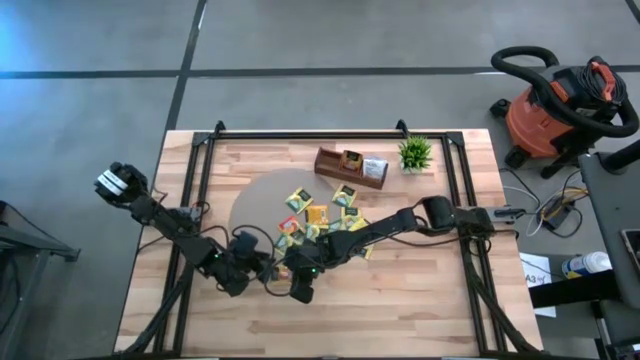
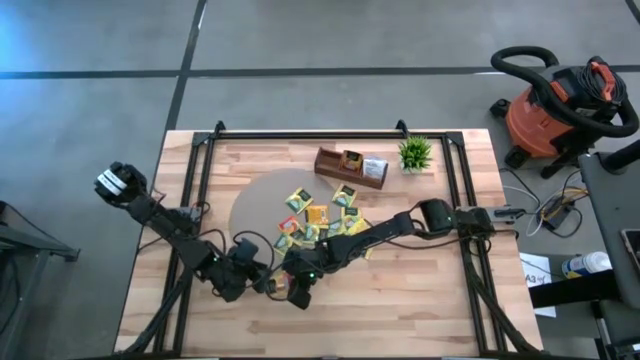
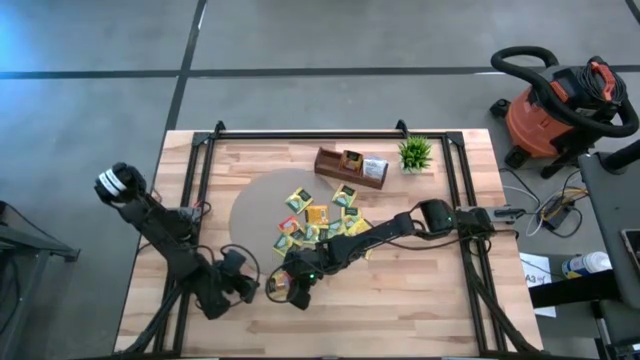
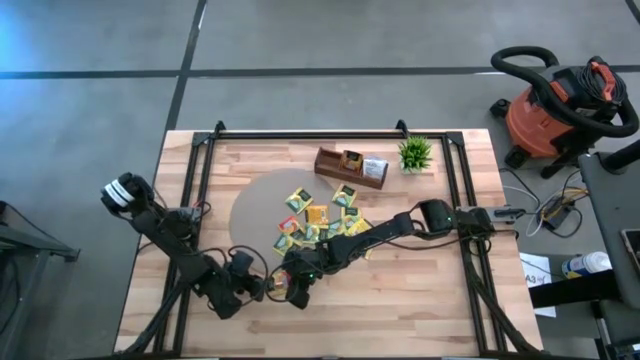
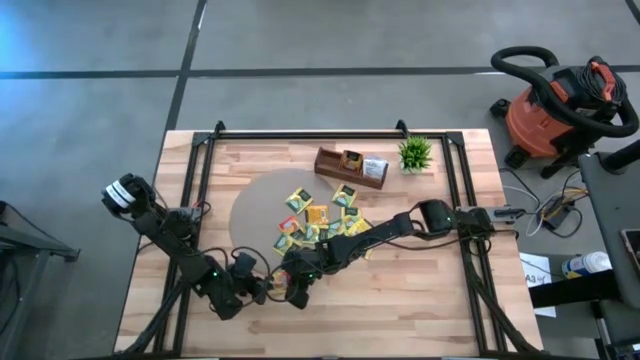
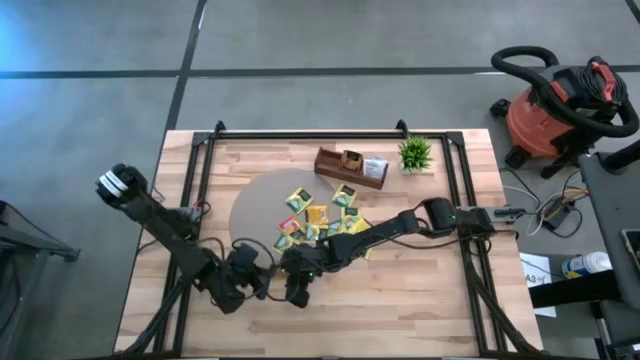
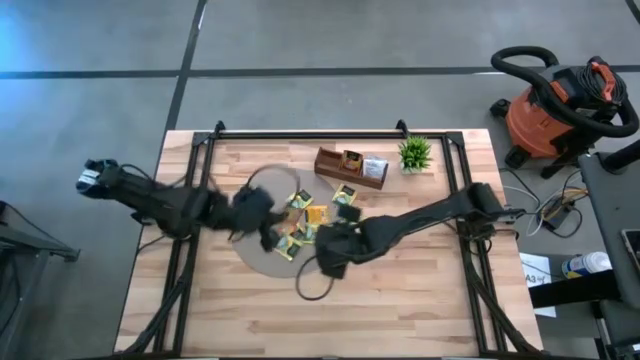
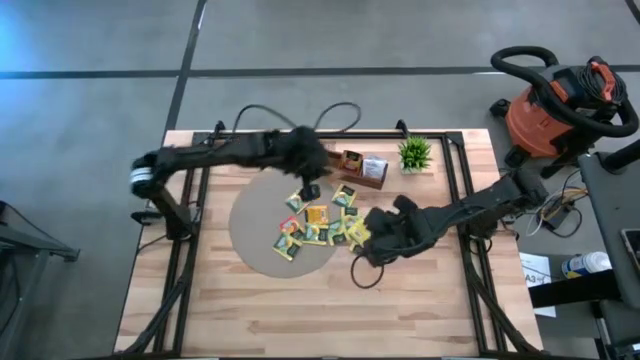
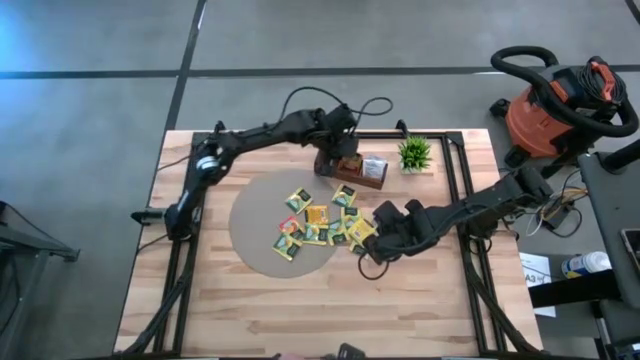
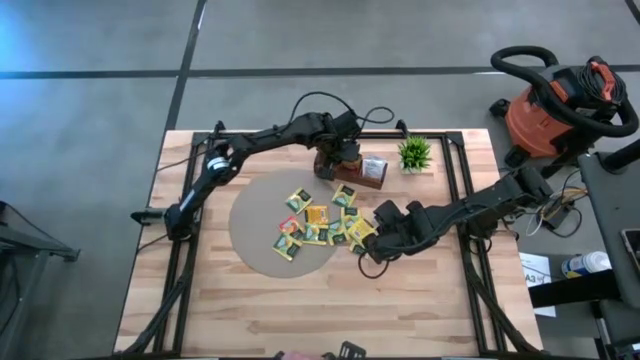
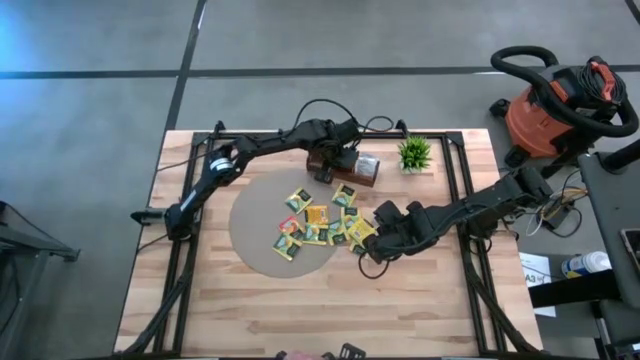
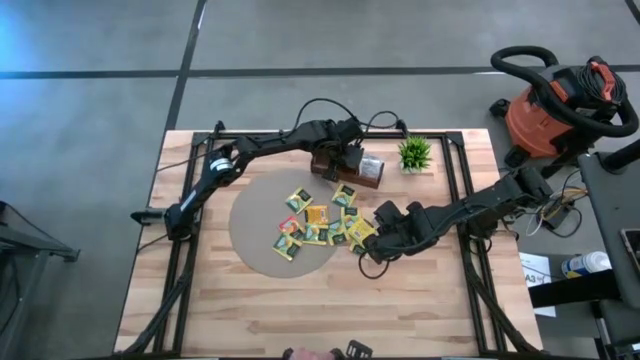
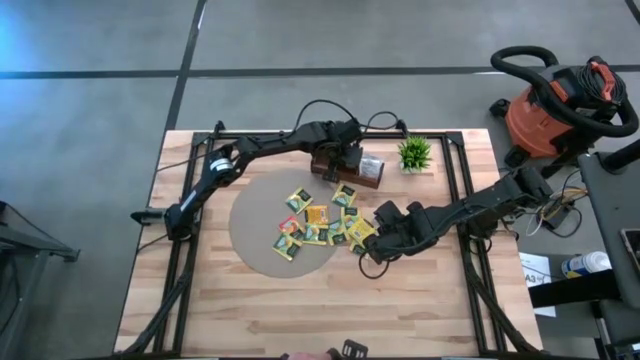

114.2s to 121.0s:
Task: Pick & Place Tea
Put the red tea sachet into the middle compartment of the wooden organizer

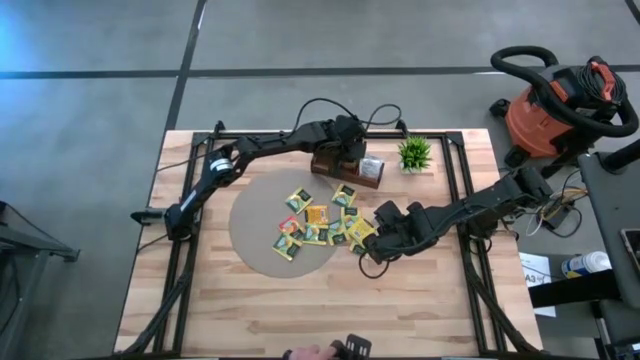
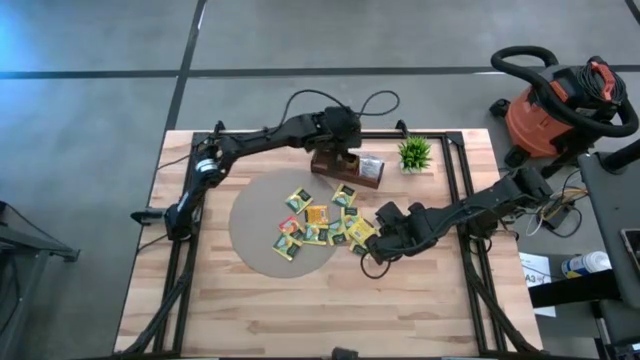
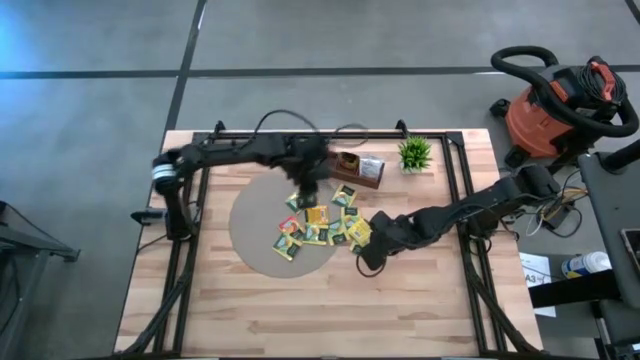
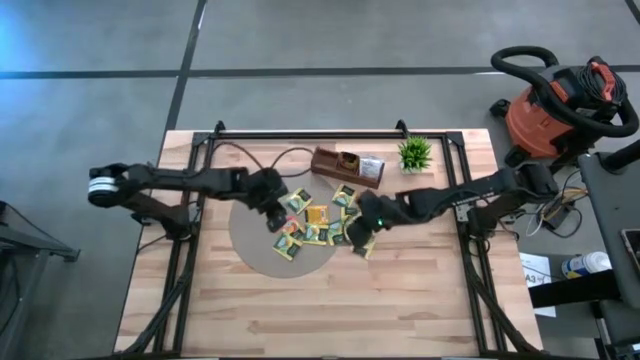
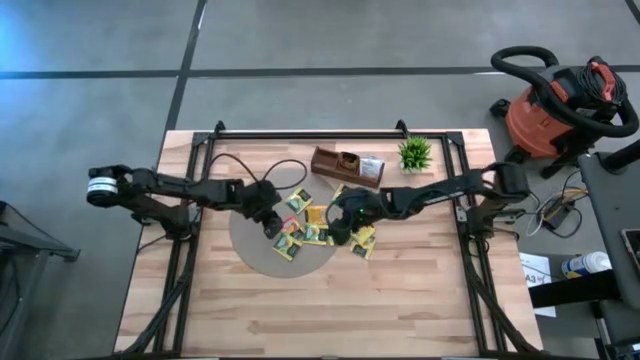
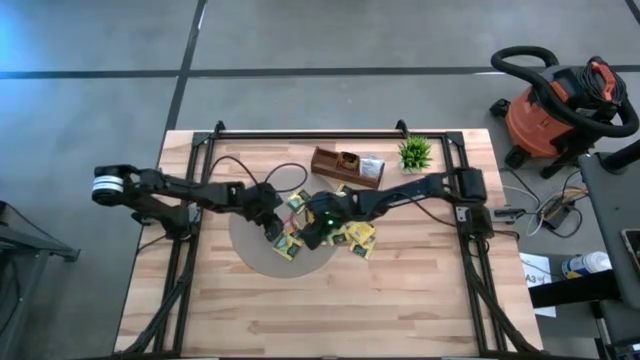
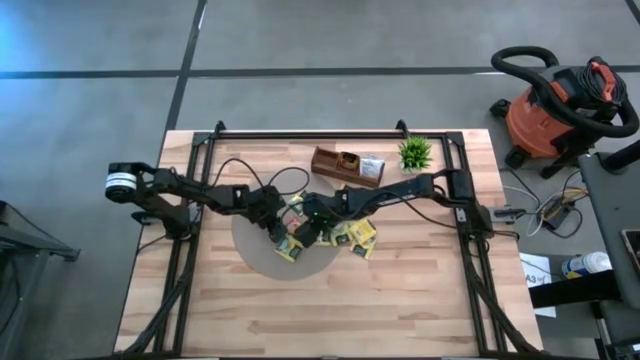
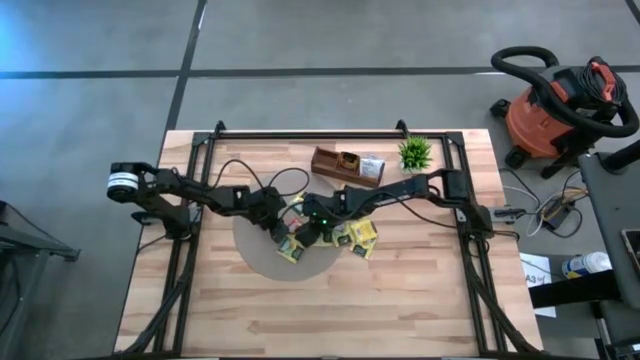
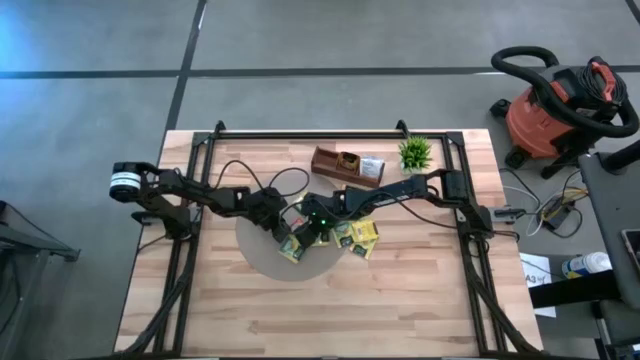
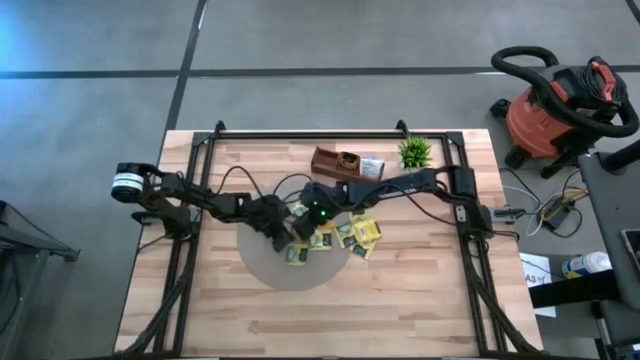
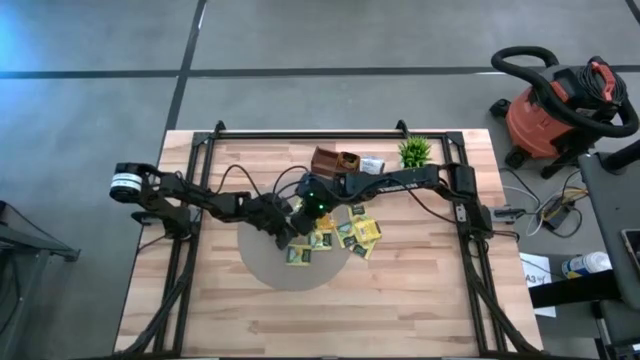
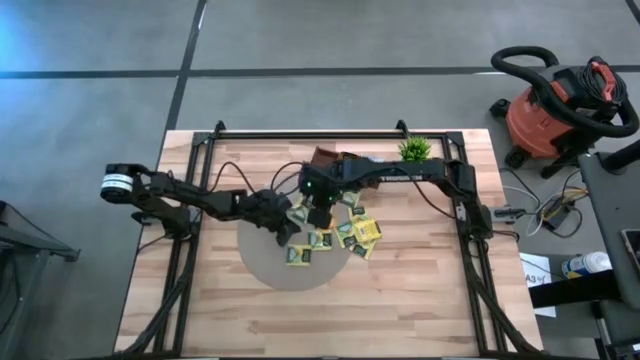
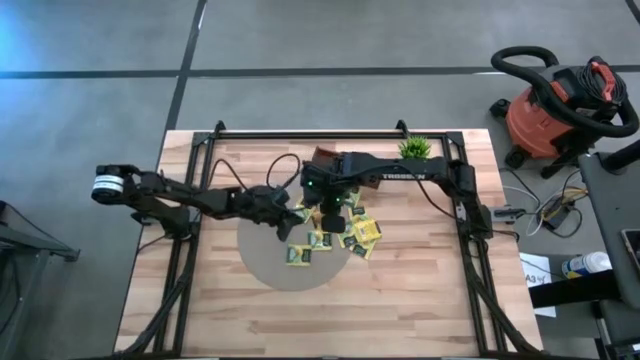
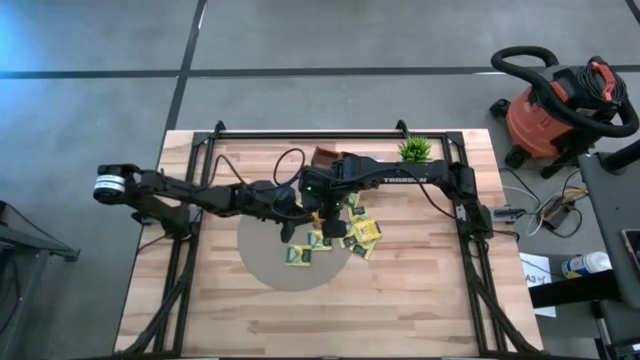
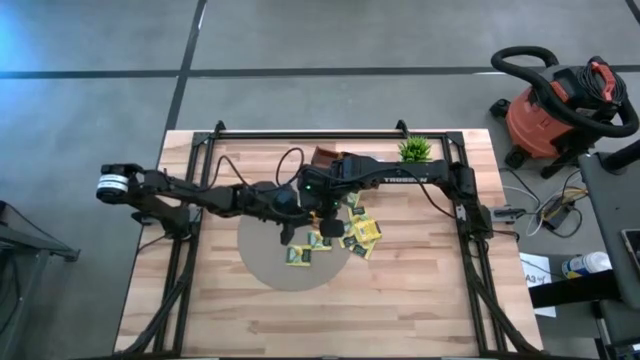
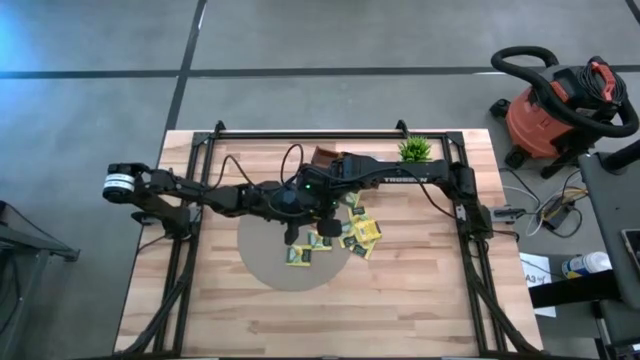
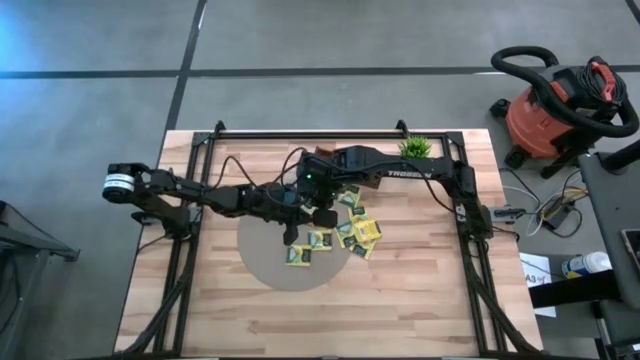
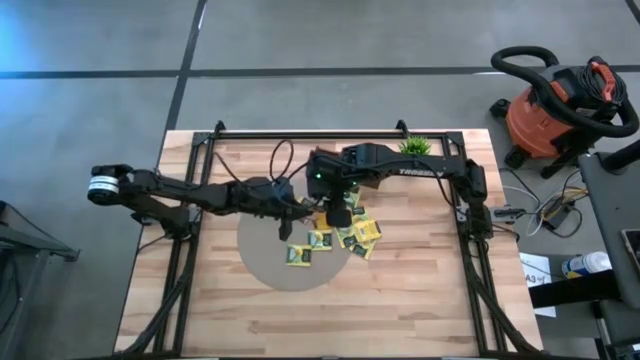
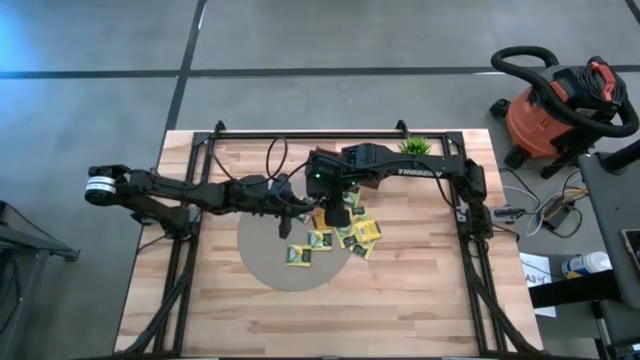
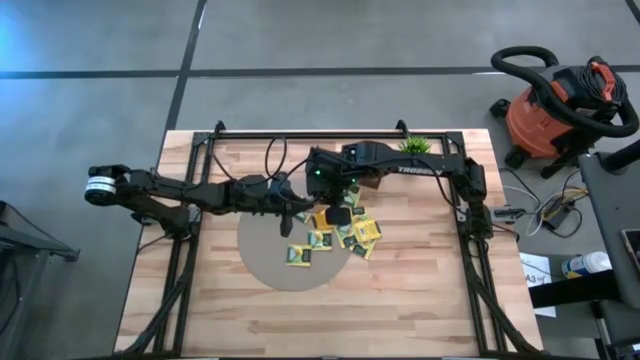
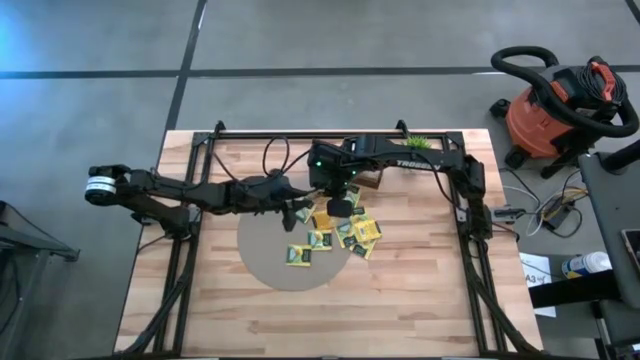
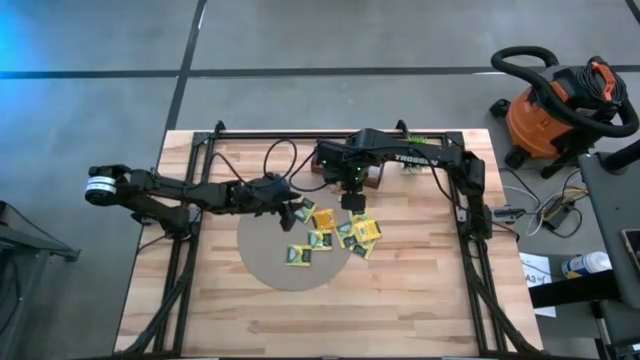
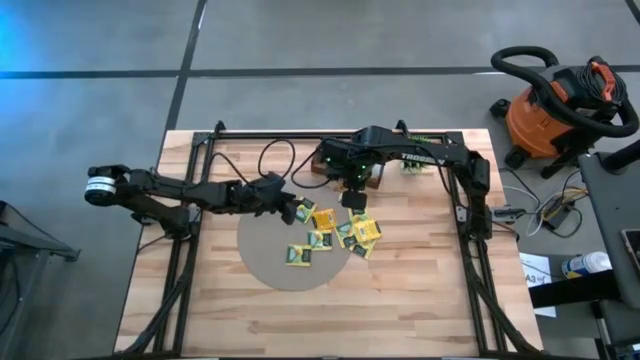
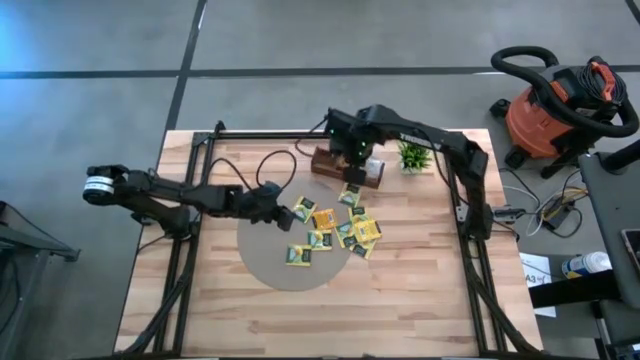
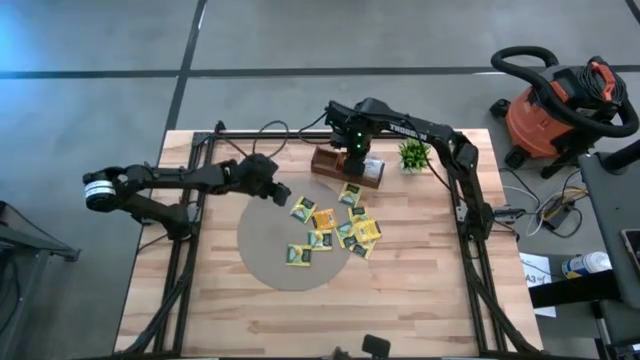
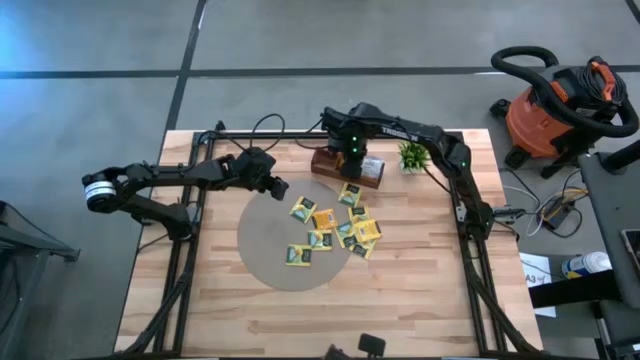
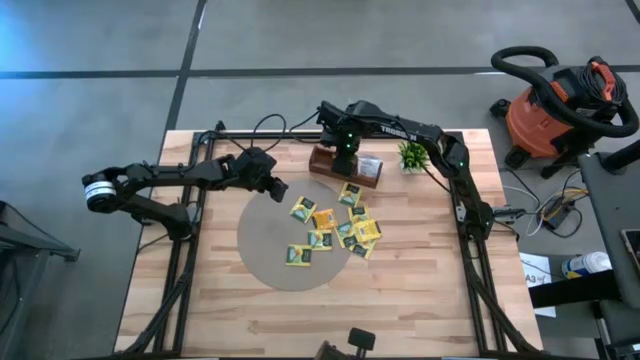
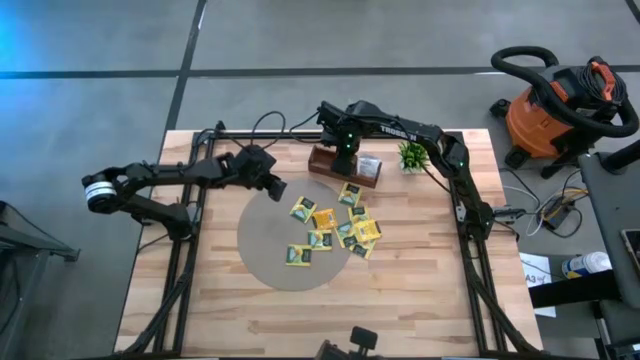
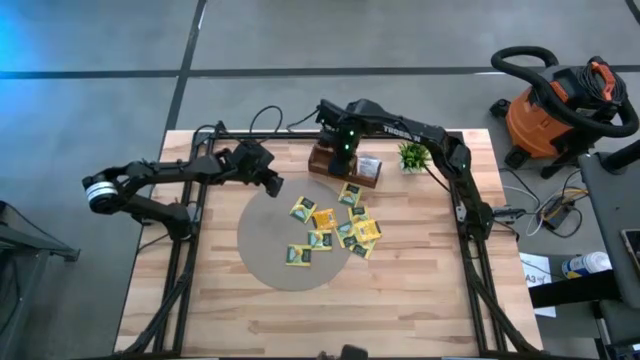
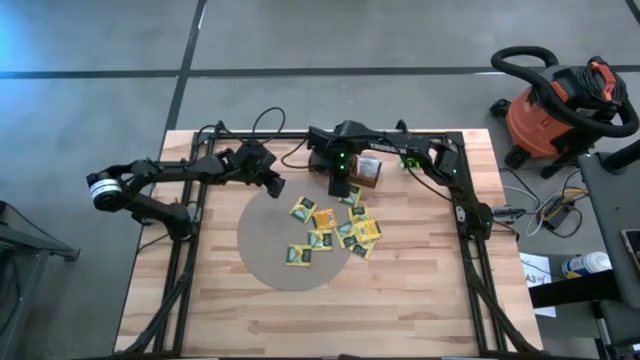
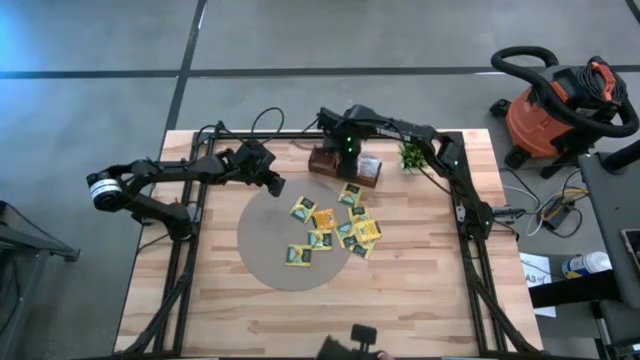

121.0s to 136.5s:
Put the red tea sachet into the middle compartment of the wooden organizer
